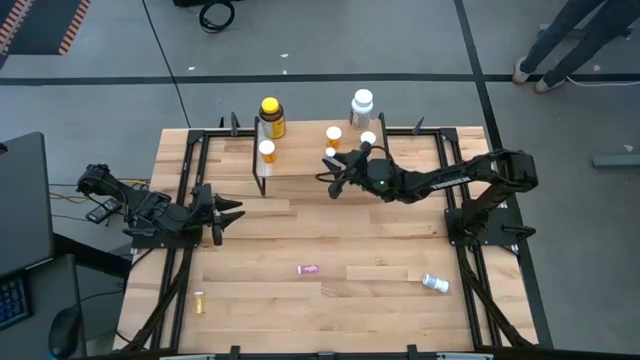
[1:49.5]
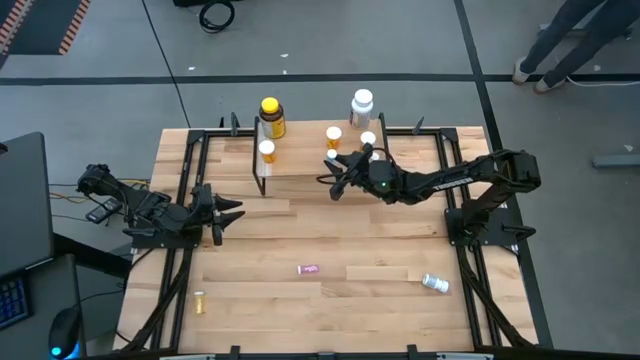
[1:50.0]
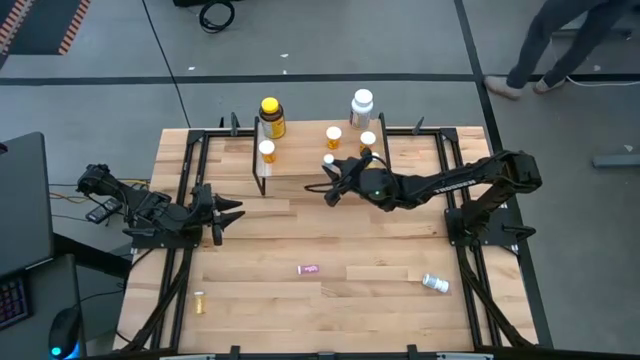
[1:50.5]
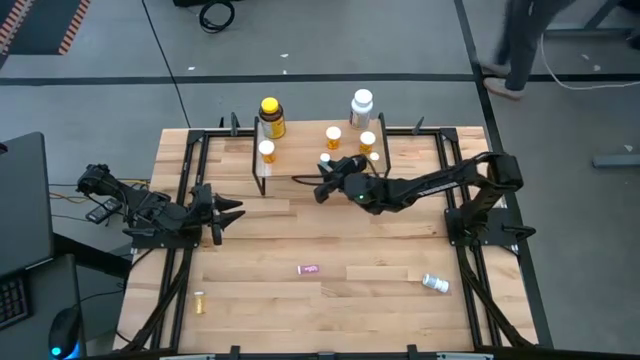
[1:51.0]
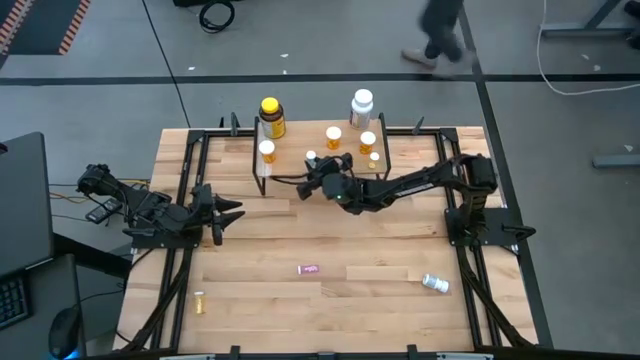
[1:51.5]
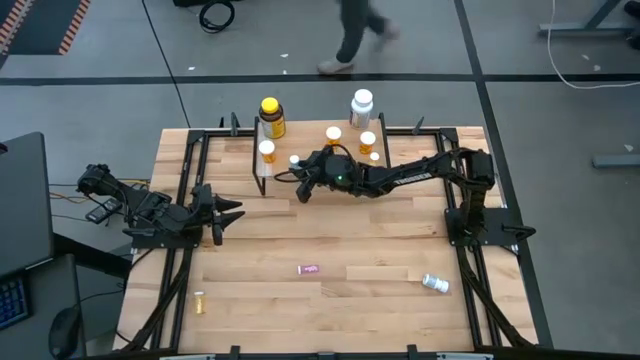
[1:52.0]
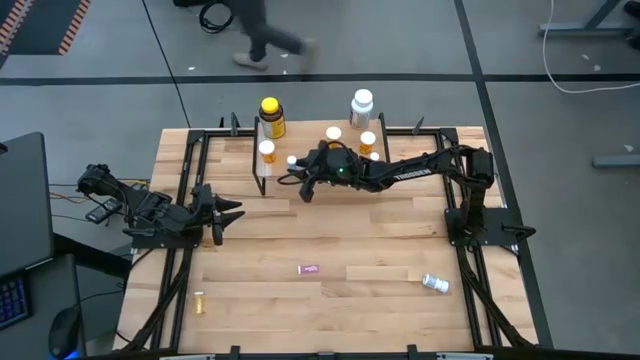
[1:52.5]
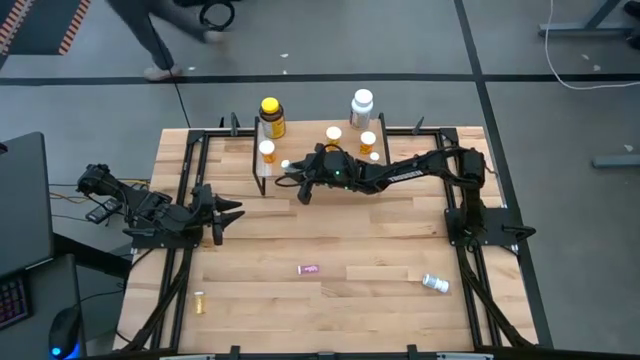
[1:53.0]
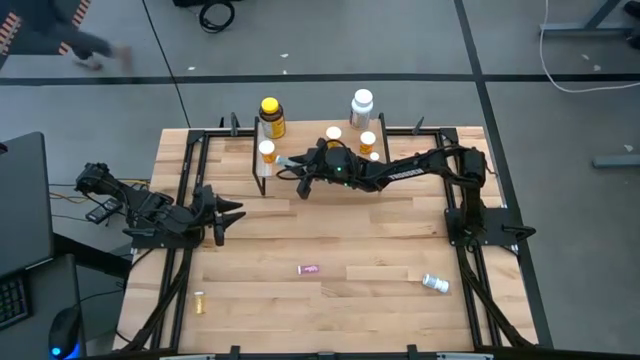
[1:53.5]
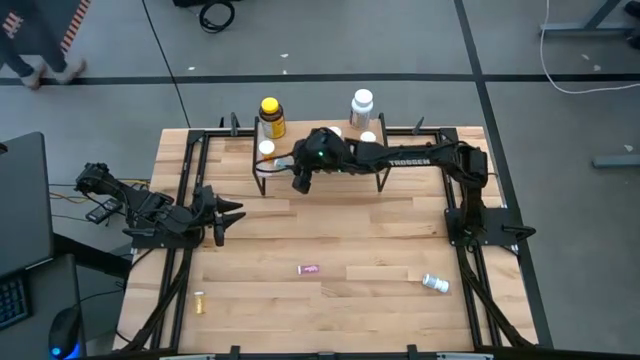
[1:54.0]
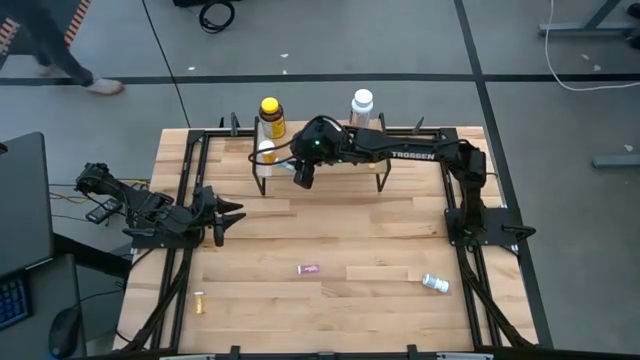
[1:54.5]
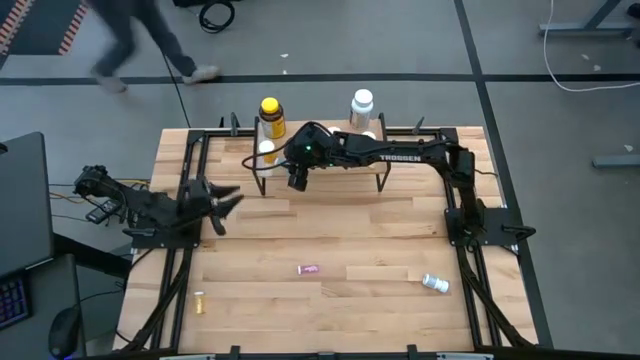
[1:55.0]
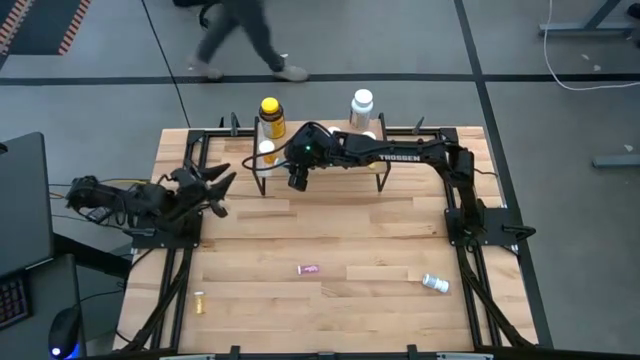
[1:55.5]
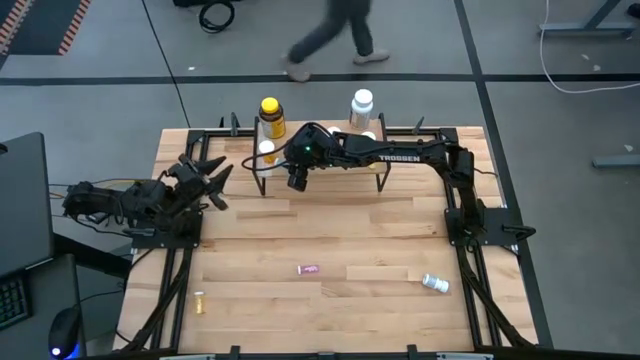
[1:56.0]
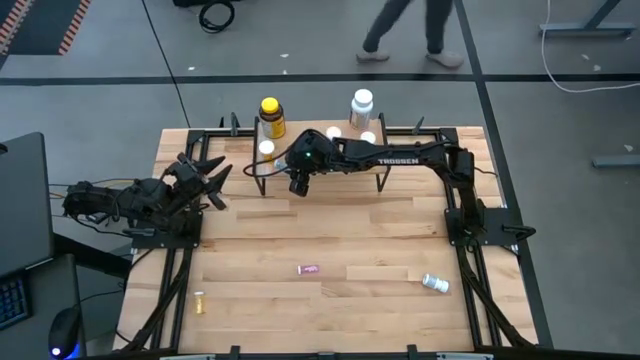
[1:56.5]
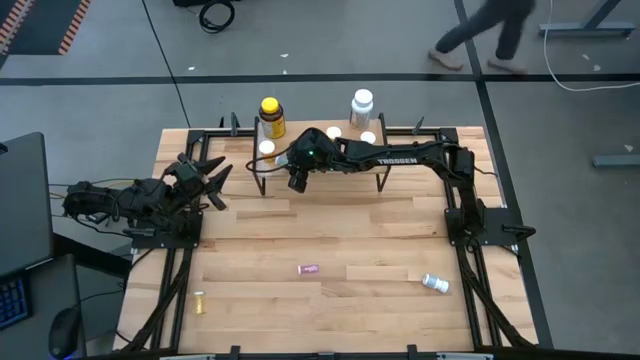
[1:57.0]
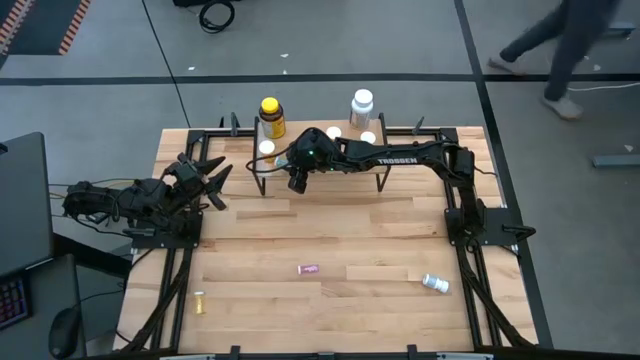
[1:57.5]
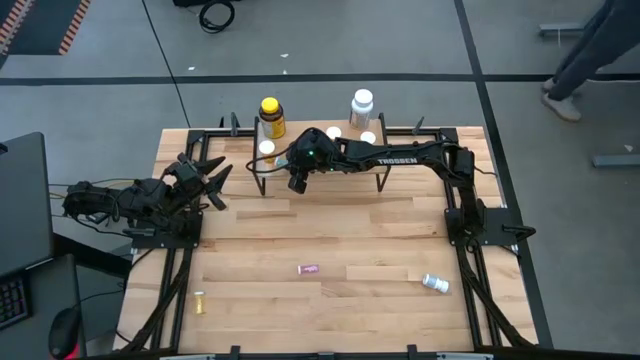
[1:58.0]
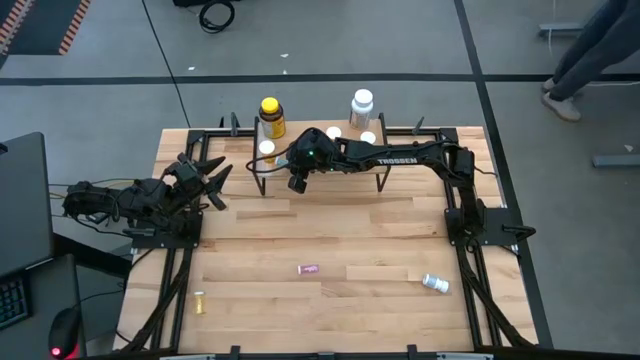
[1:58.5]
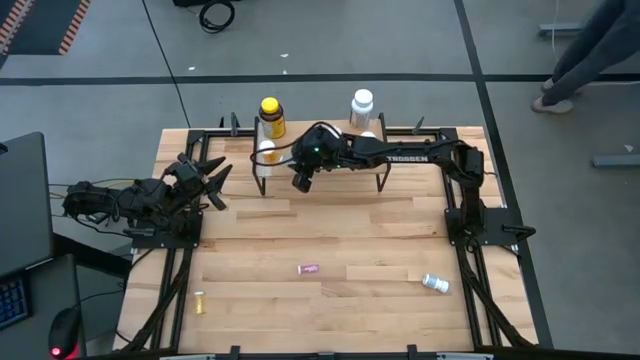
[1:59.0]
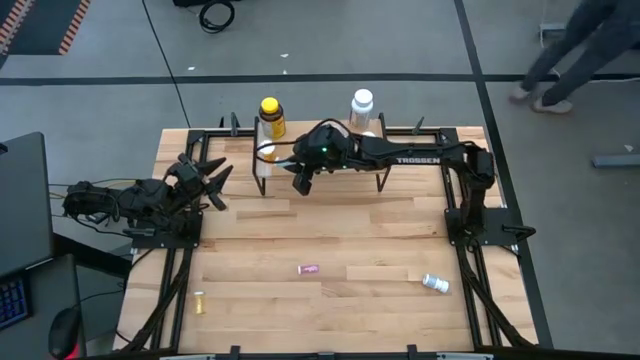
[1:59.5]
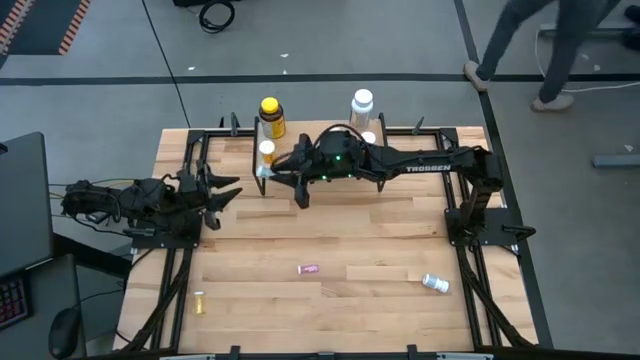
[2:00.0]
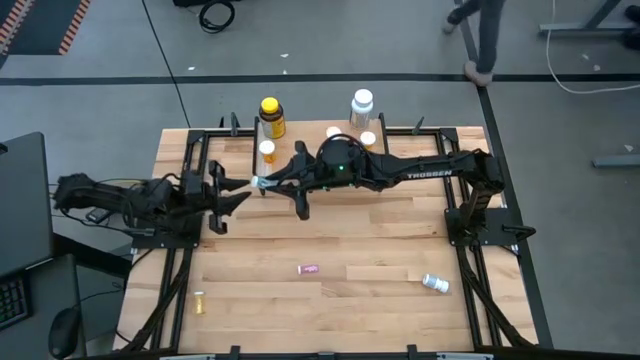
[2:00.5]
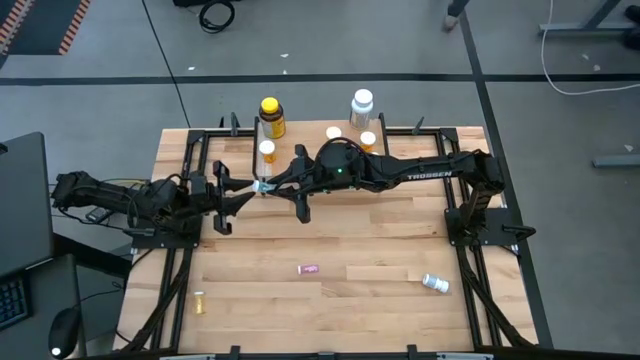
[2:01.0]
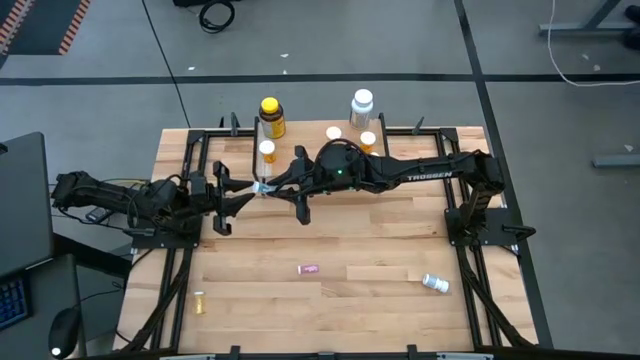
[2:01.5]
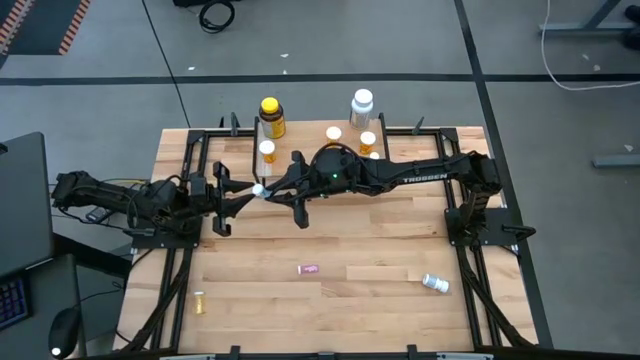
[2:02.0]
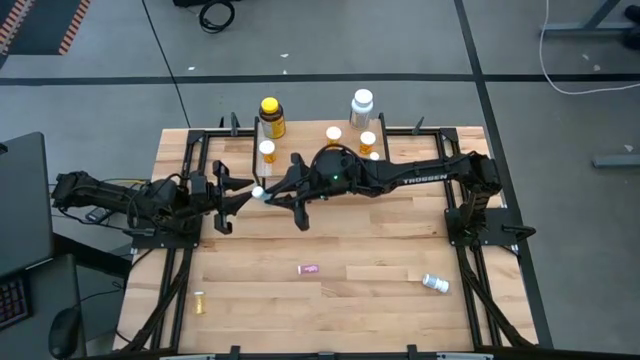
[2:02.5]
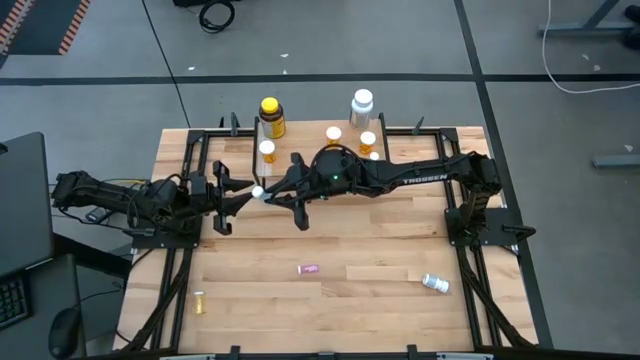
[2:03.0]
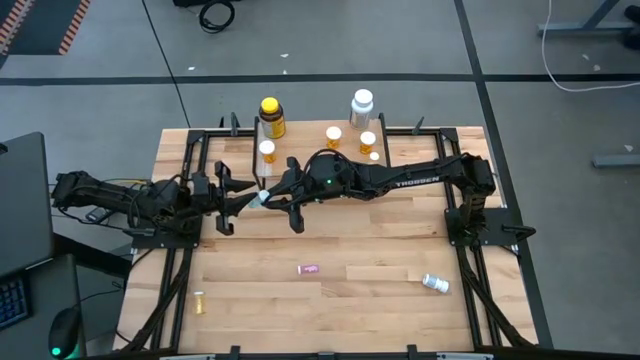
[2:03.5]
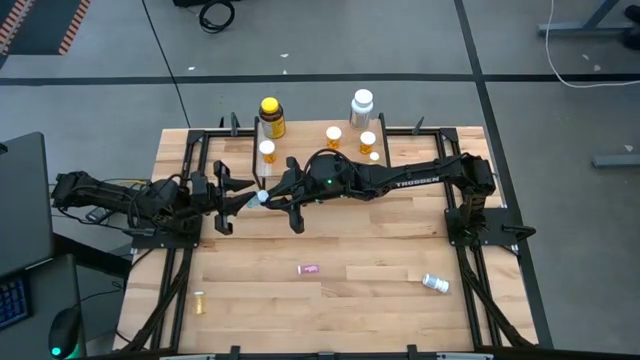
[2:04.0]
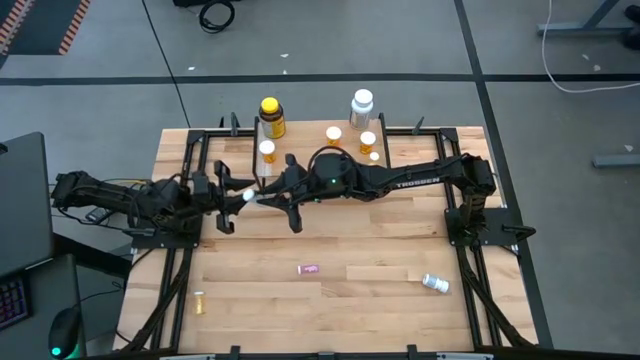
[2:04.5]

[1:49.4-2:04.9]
Task: Pick and place medicine bottles onto shelf by color
Put the blue pill bottle on the shelf

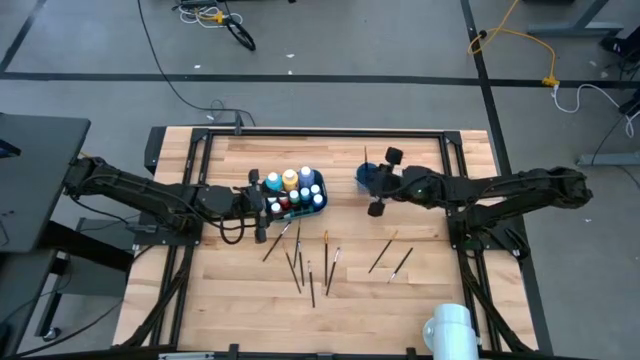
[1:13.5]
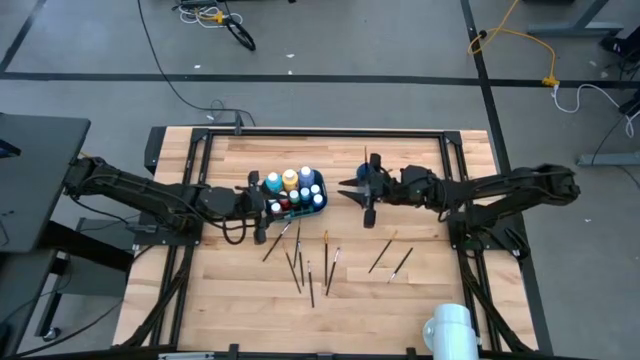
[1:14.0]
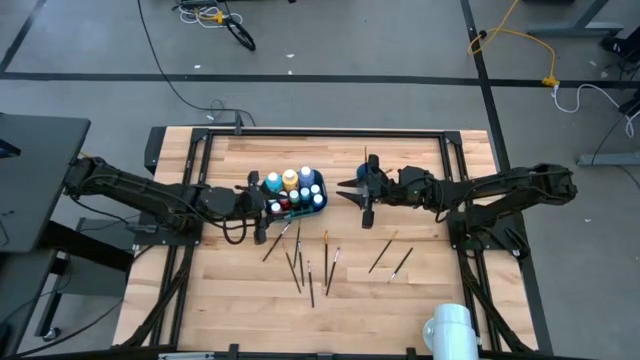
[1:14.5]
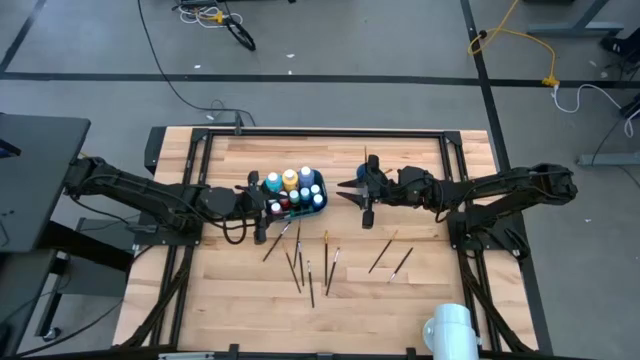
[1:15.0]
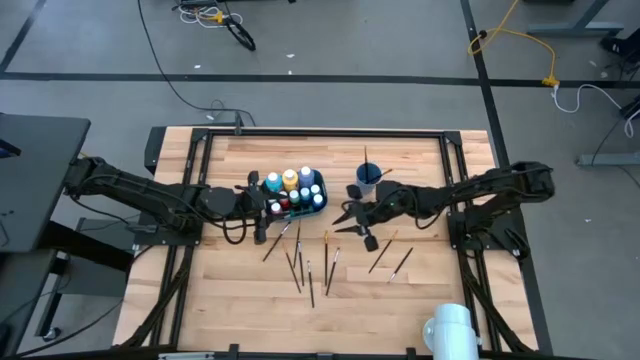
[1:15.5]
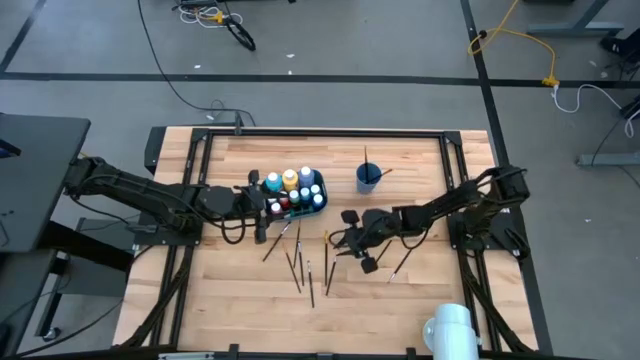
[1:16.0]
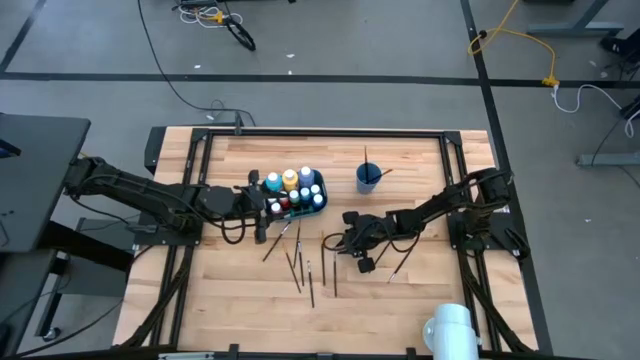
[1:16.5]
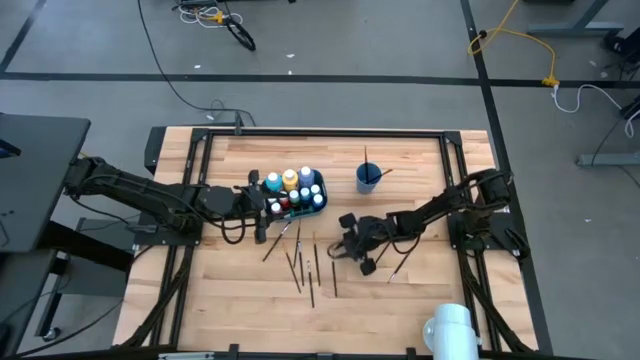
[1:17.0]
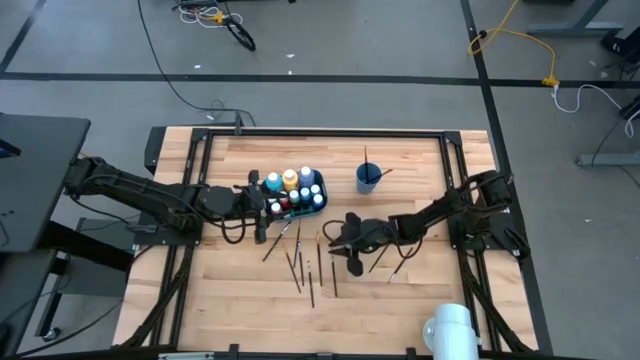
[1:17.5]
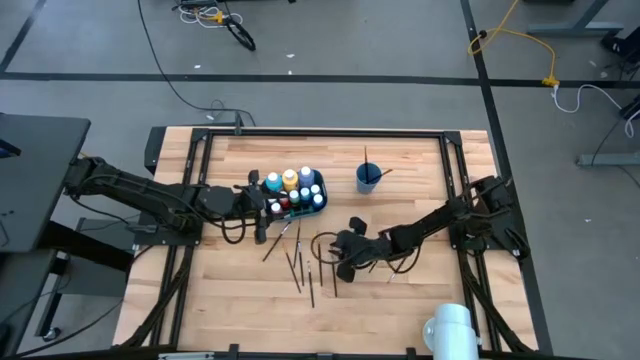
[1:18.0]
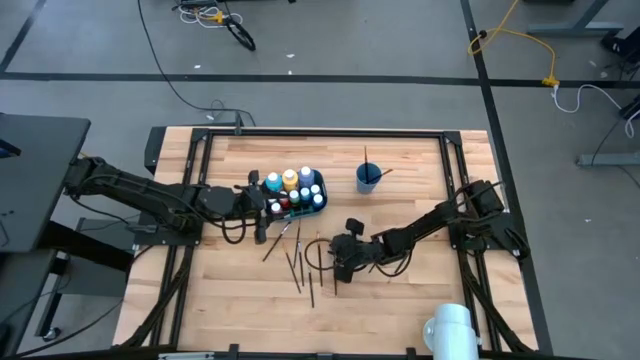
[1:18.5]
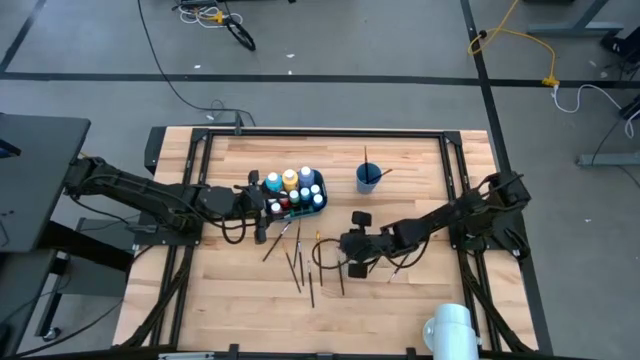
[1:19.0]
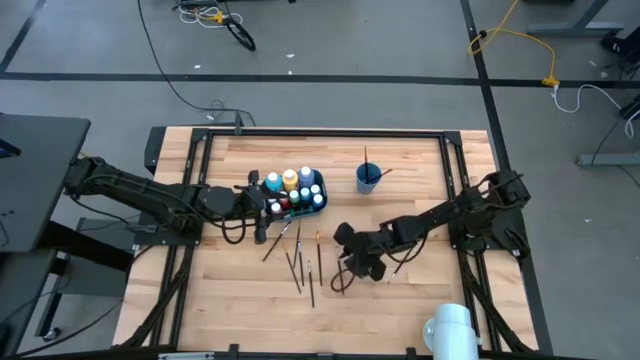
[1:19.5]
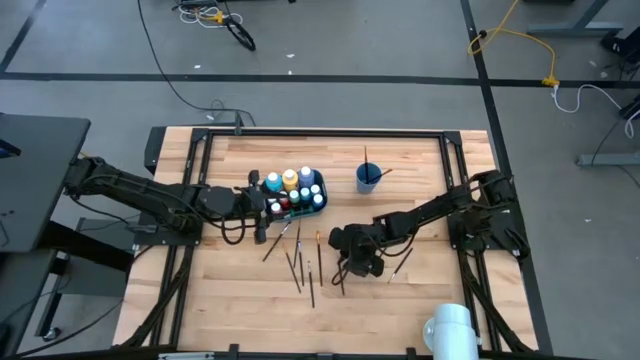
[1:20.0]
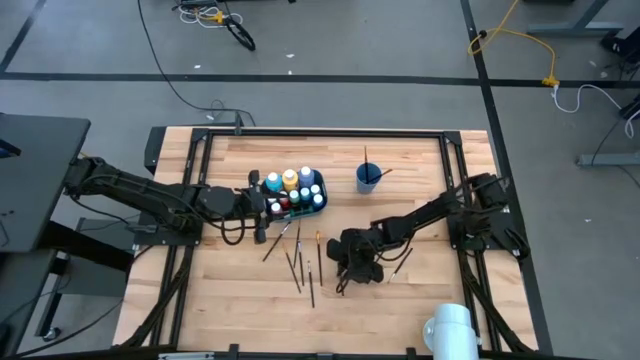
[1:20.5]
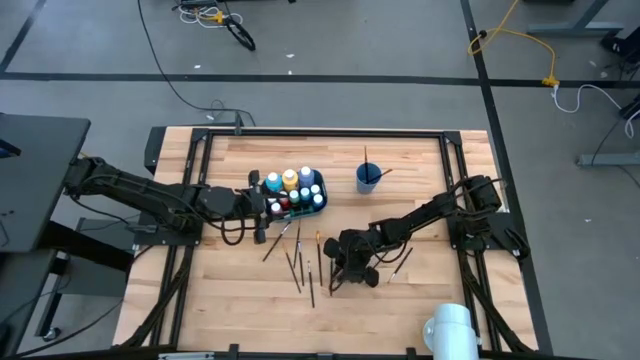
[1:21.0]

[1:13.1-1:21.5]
Task: Pick & Place Paint Supplies
Put the silver paint brush into the blue cup
